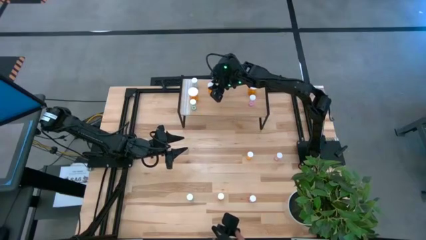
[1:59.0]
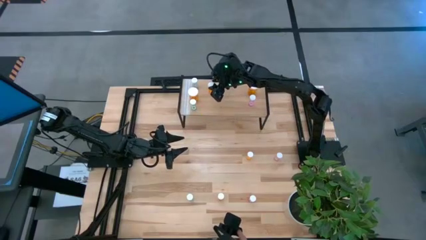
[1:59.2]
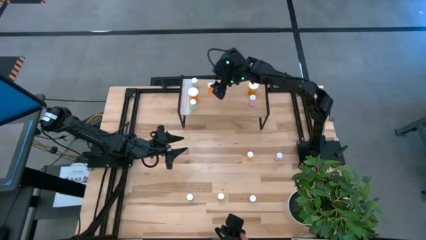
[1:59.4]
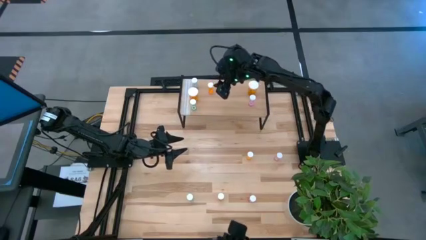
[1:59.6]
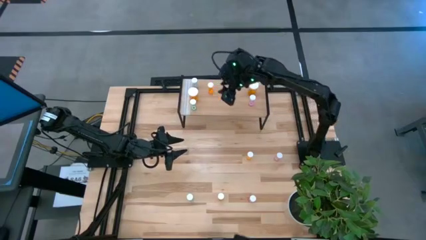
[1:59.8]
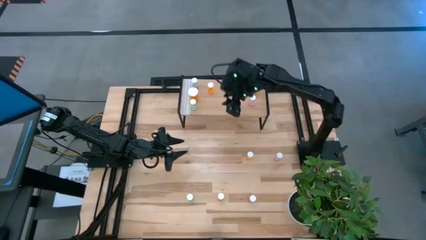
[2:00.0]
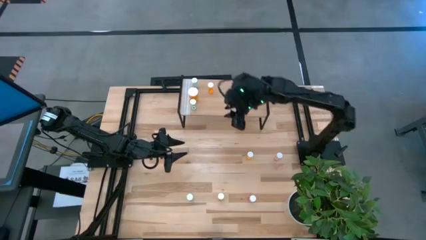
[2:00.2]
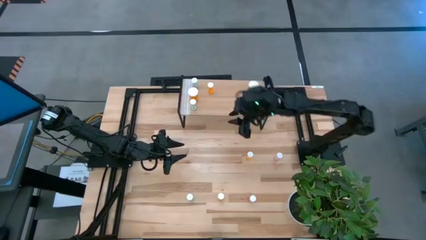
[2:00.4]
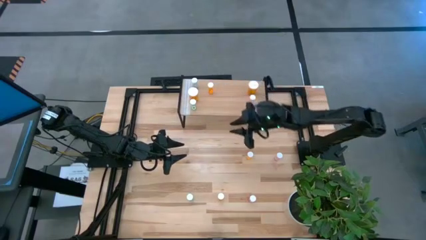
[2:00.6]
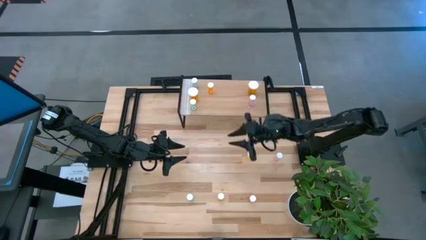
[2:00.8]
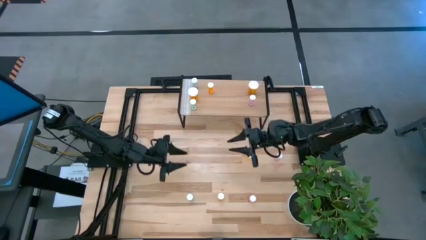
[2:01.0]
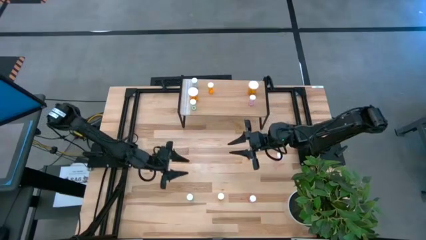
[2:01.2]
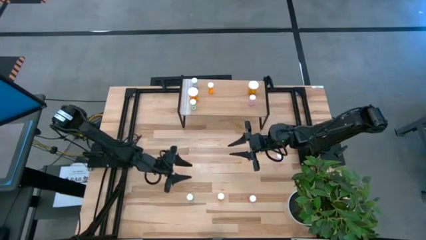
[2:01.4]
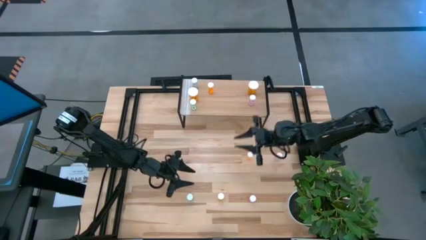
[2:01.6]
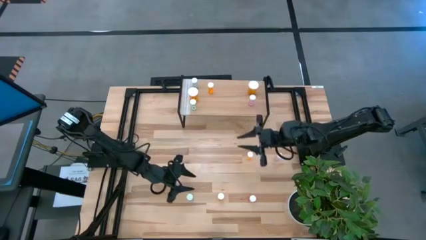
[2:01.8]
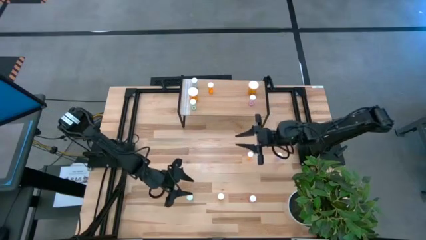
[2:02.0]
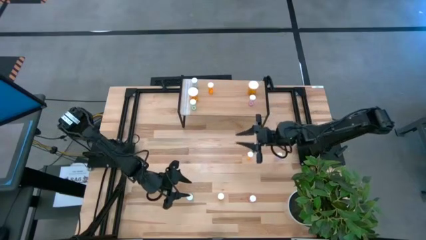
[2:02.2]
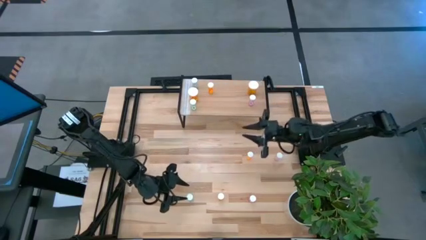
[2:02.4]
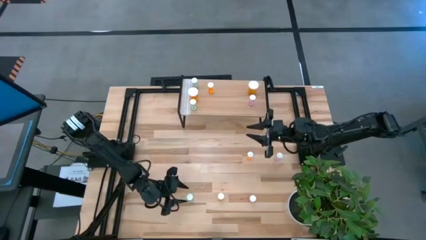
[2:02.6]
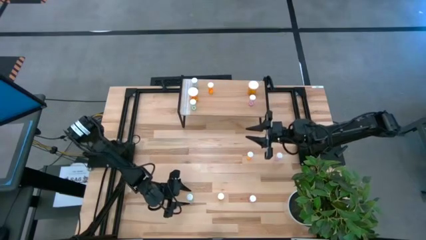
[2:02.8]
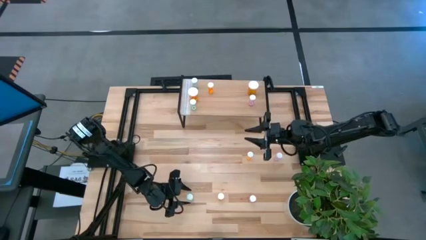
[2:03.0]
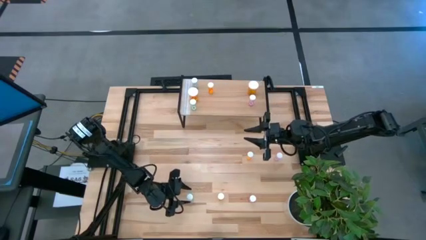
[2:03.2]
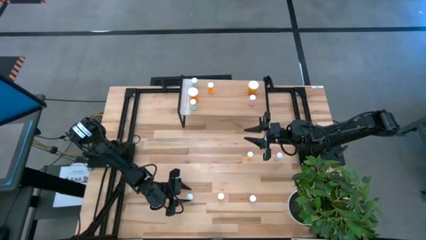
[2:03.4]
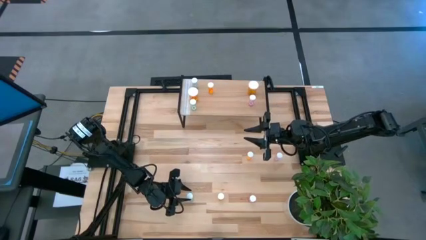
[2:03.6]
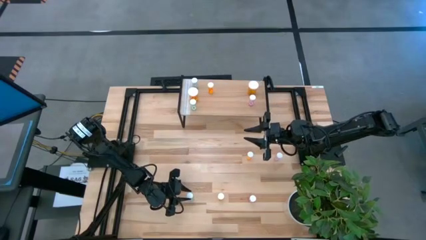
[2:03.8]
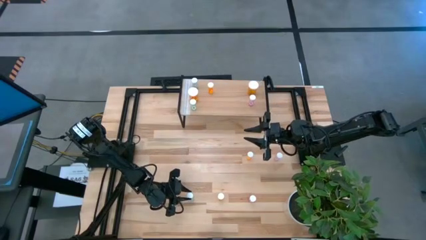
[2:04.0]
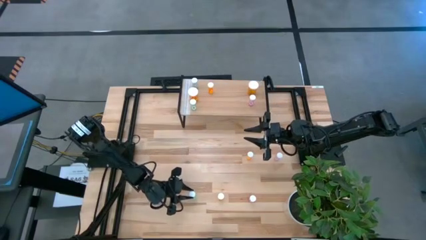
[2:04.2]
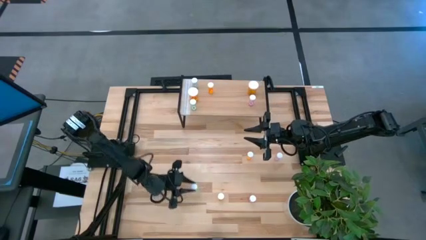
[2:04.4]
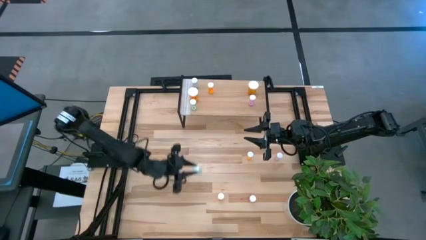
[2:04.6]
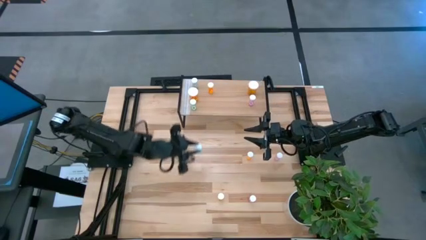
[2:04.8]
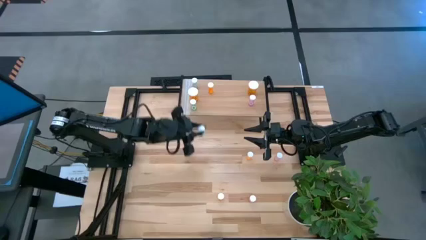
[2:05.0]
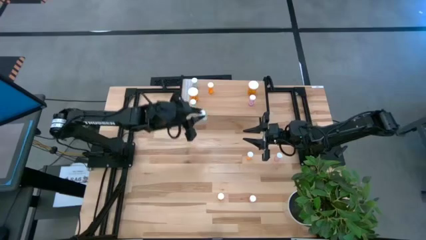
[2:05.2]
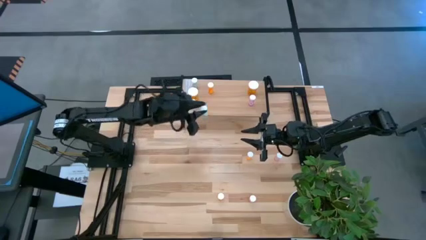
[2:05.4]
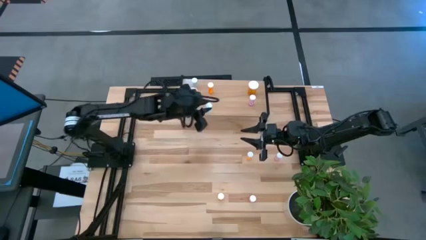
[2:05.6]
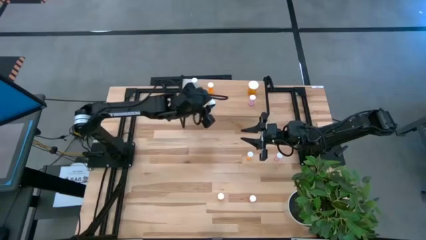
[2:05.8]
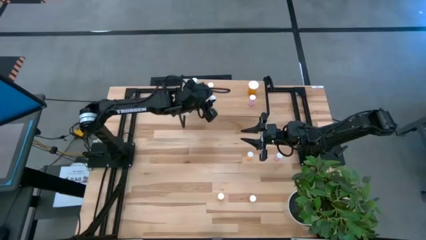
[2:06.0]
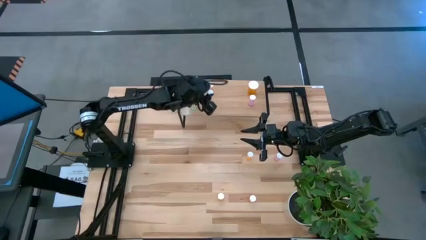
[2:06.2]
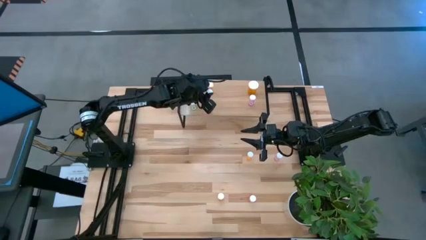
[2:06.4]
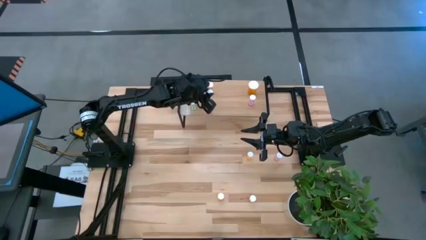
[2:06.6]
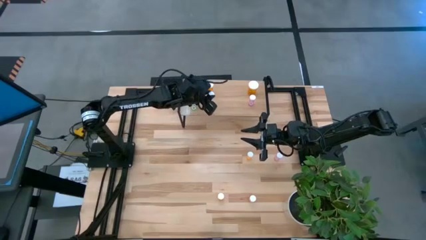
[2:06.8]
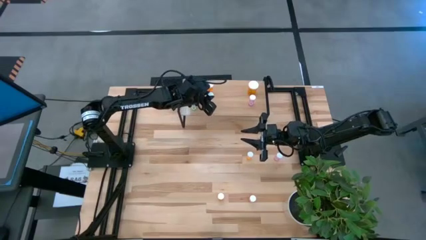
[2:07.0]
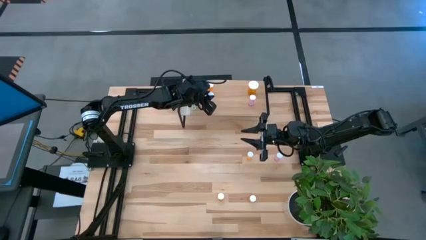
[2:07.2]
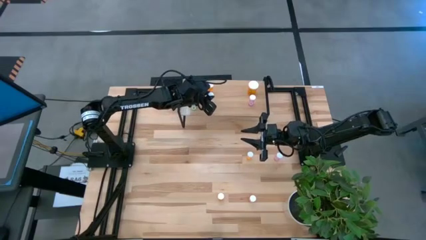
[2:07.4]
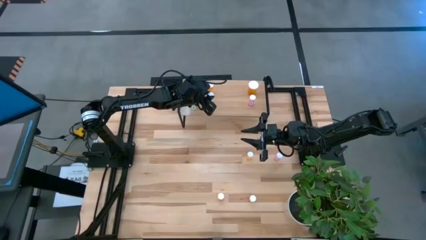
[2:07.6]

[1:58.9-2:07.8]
Task: Pick and place medicine bottles onto shelf by color
Put the blue pill bottle on the shelf

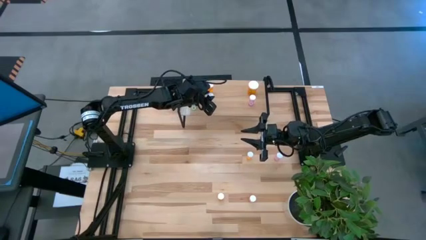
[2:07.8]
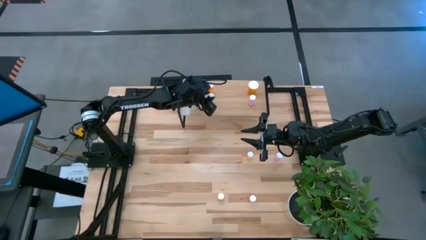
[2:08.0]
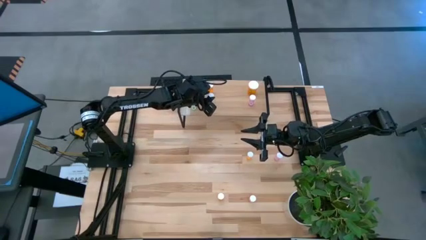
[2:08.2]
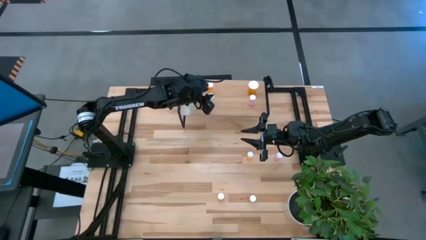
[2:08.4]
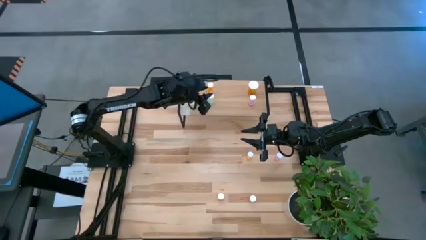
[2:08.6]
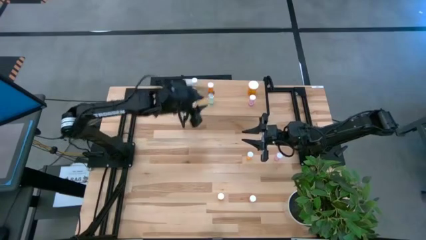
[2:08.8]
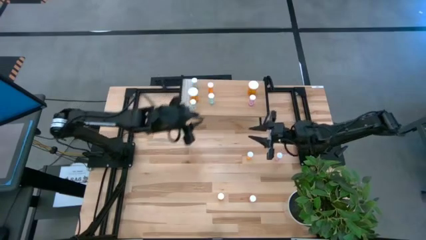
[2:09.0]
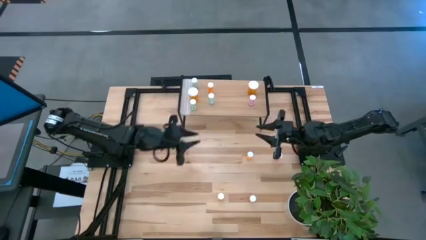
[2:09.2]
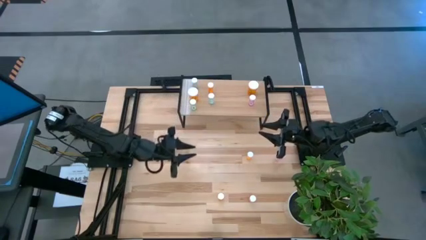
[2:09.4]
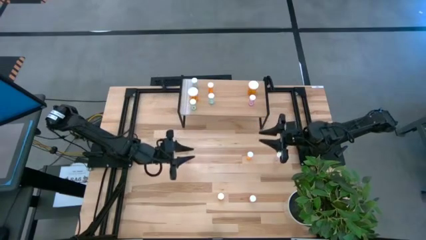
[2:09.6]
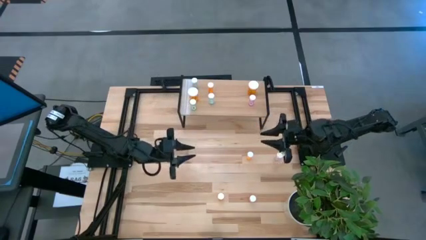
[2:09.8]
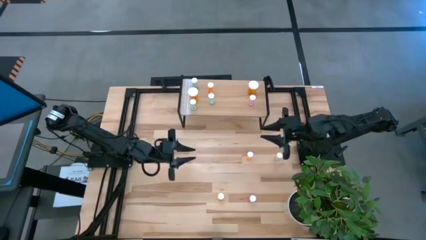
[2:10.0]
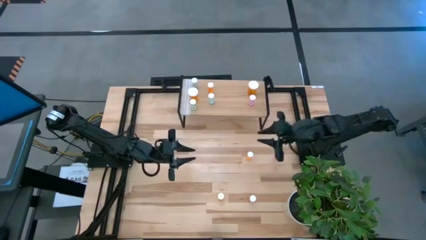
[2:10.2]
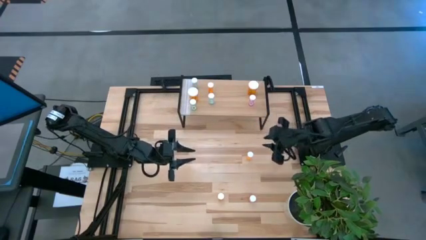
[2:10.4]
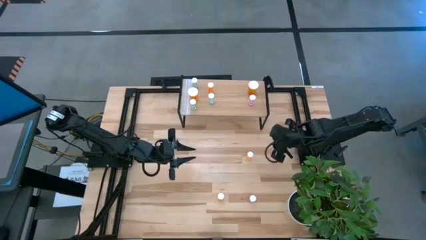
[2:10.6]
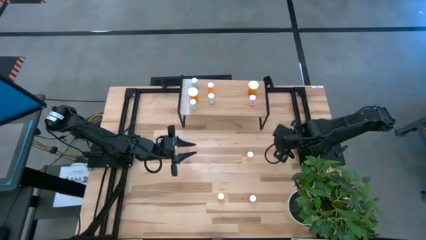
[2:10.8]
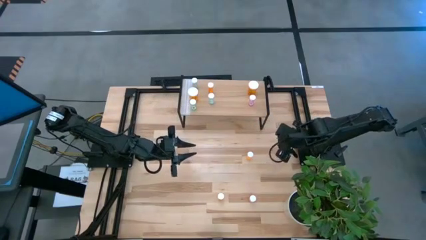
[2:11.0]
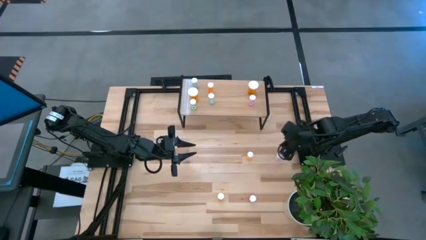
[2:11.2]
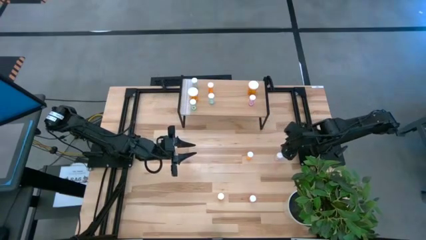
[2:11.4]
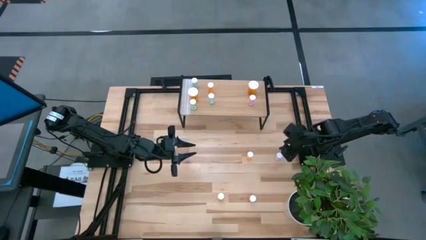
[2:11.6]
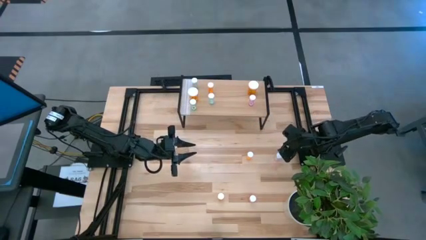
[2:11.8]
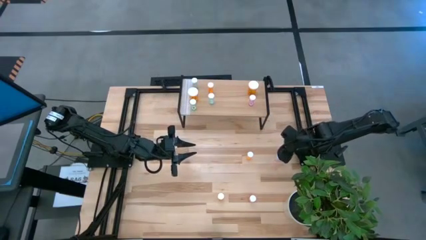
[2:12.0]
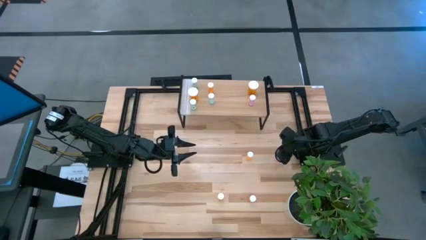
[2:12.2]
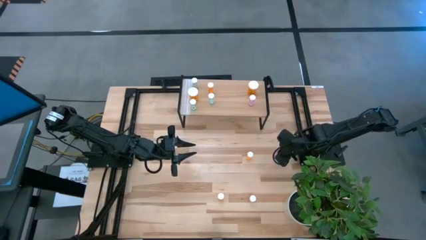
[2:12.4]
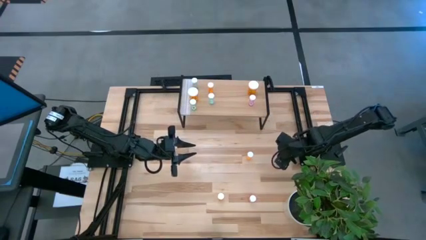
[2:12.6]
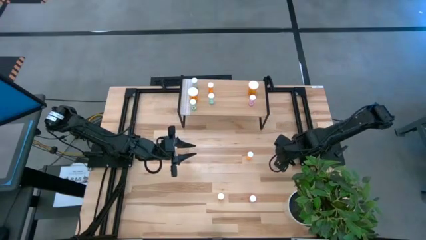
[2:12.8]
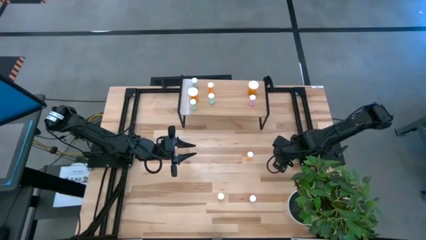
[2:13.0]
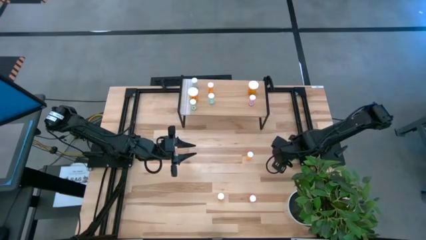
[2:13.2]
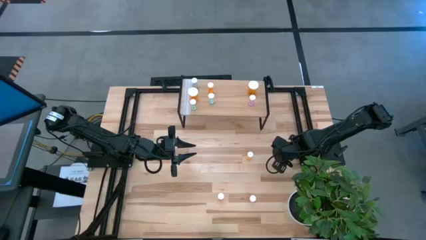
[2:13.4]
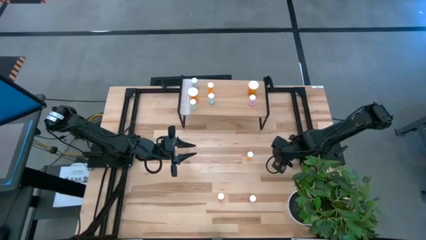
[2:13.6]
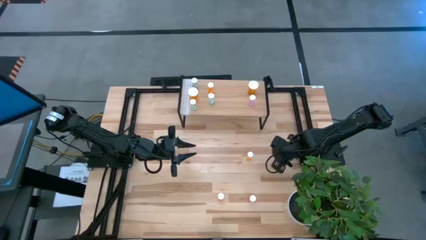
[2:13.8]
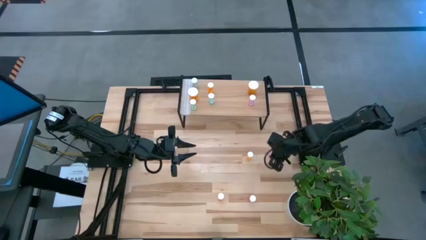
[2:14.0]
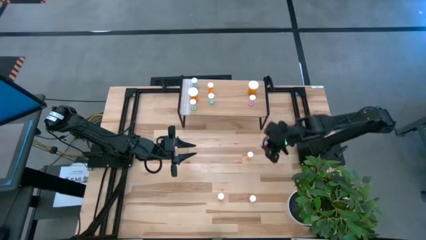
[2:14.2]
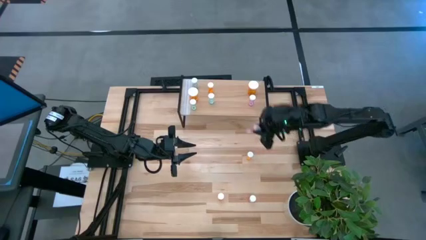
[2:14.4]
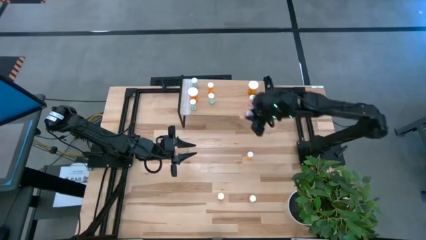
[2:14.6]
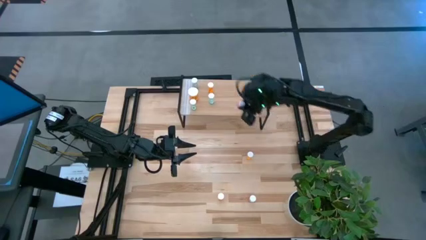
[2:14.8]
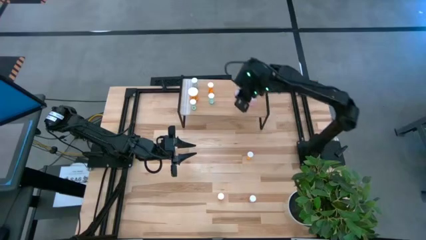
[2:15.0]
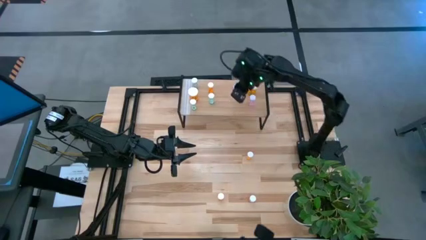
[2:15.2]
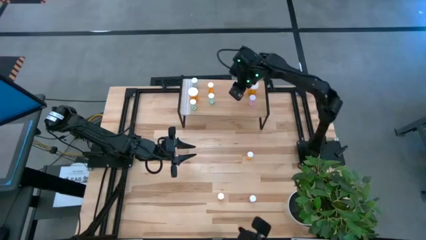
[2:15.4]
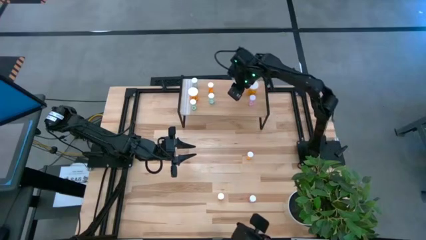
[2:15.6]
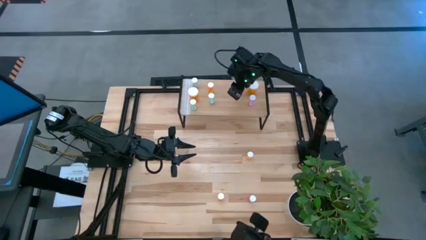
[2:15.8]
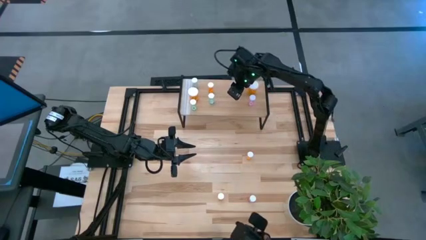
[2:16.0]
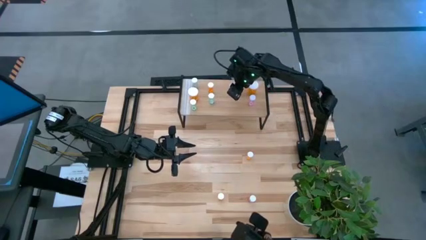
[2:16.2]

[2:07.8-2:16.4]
Put the top pink pill bottle on the shelf
